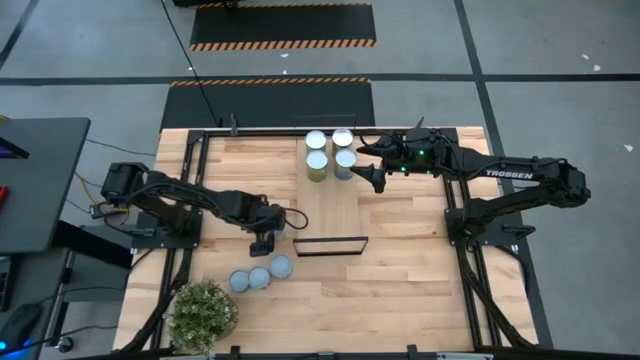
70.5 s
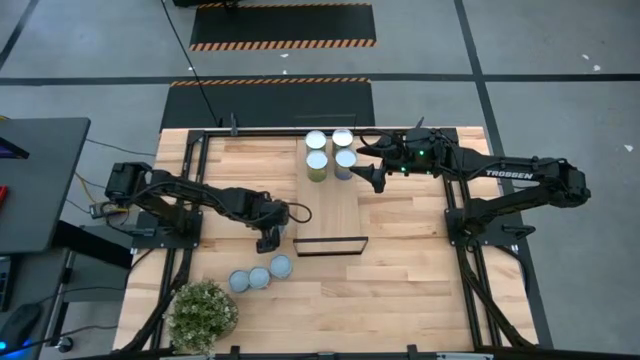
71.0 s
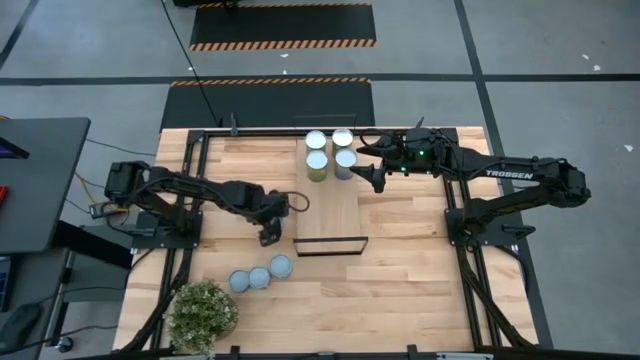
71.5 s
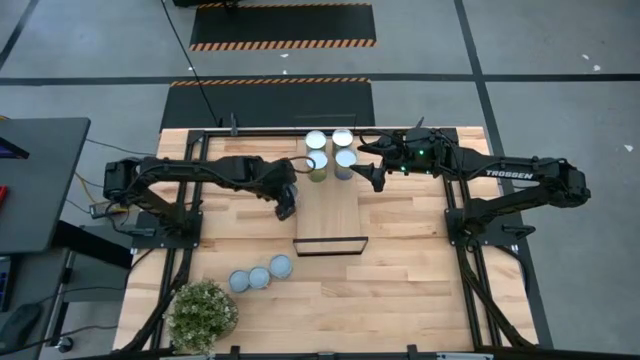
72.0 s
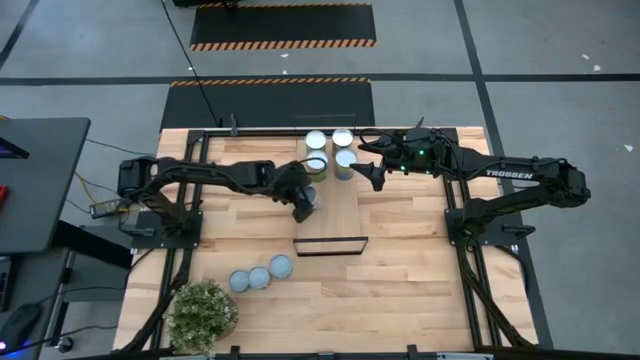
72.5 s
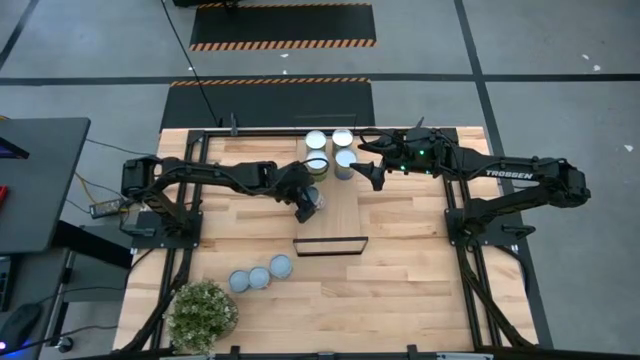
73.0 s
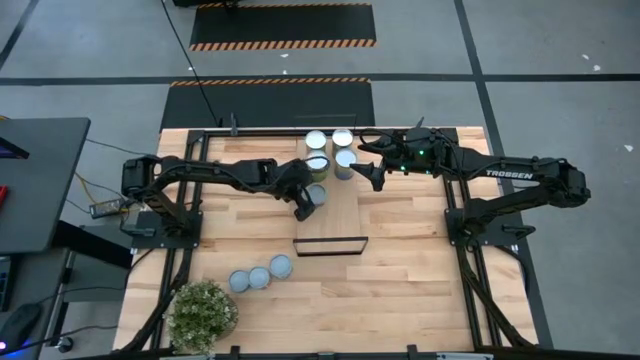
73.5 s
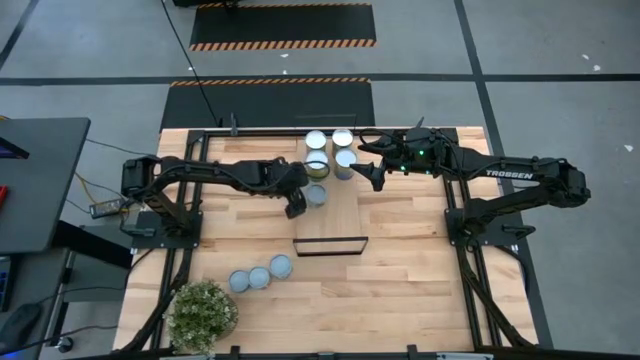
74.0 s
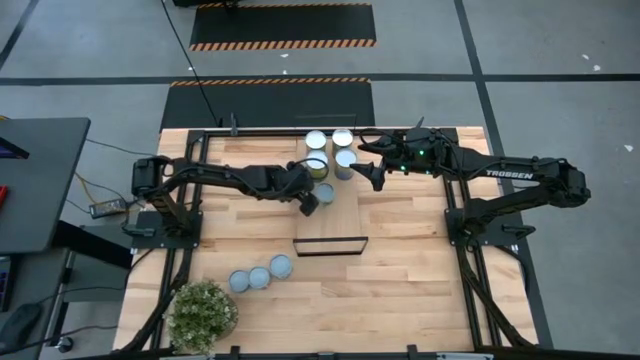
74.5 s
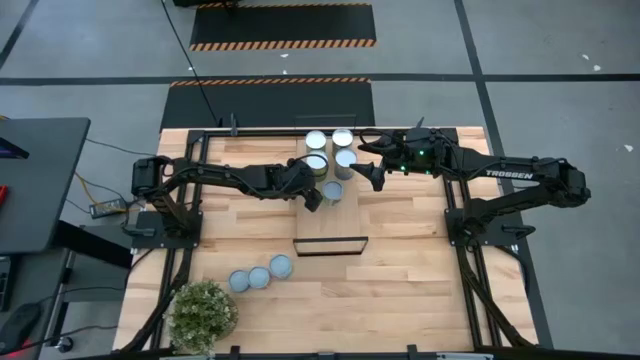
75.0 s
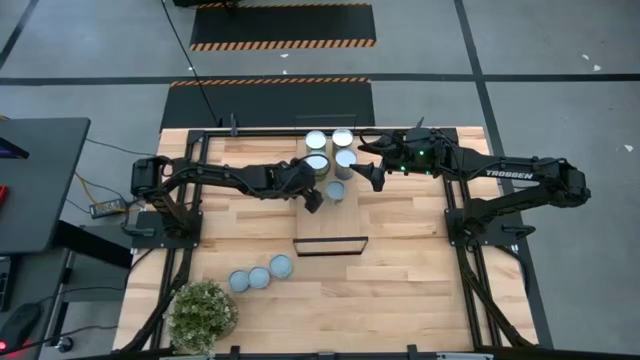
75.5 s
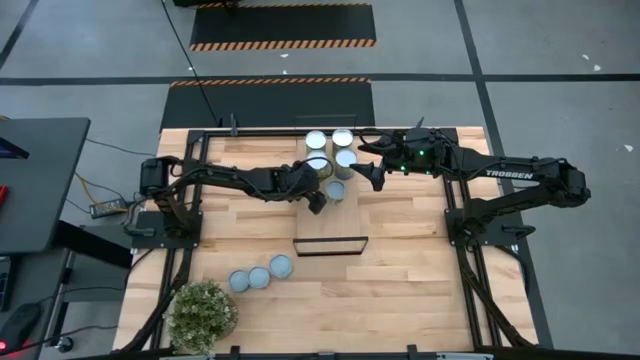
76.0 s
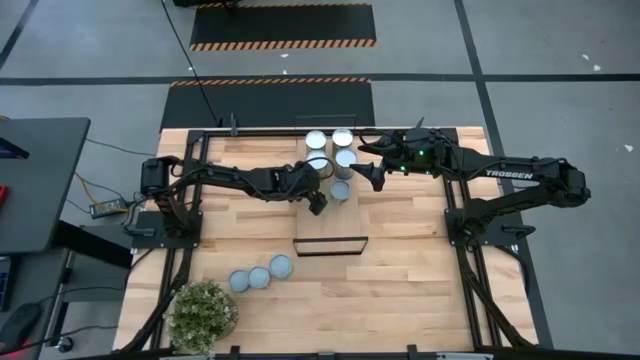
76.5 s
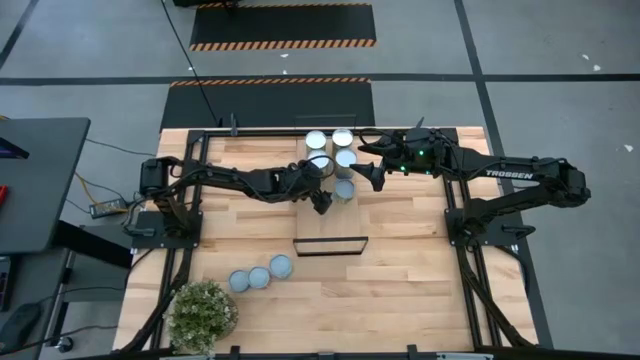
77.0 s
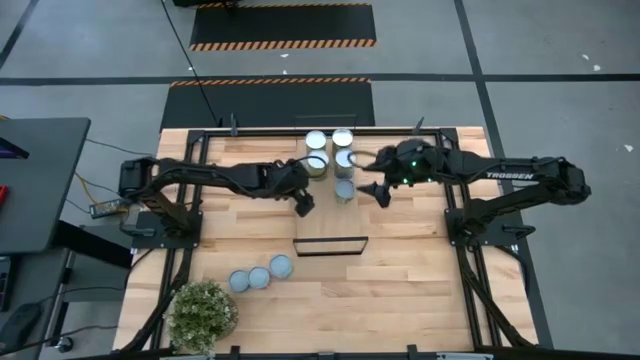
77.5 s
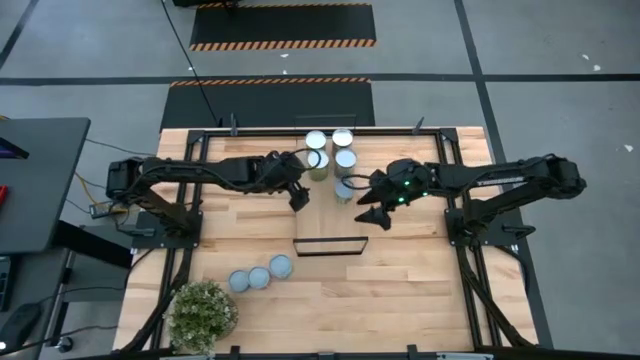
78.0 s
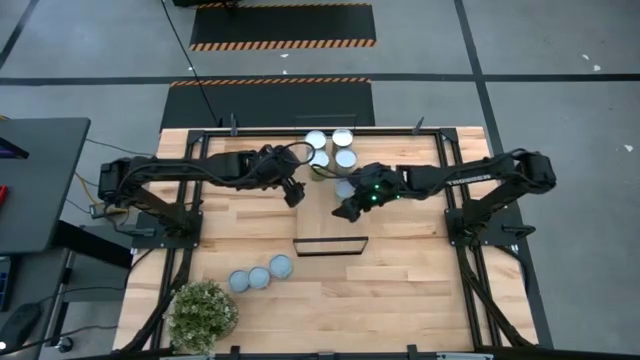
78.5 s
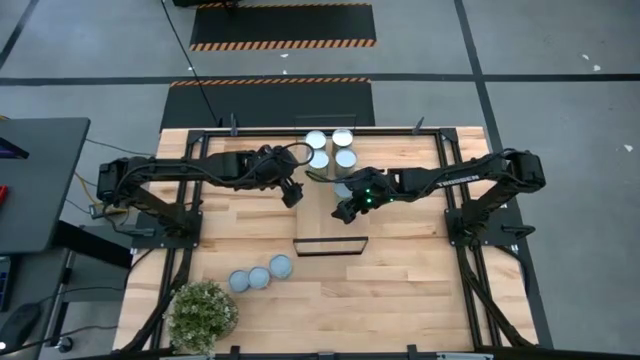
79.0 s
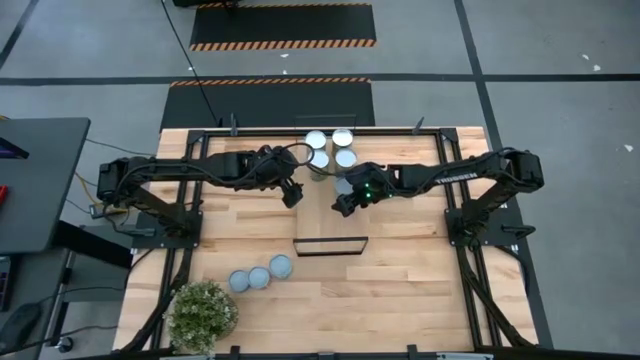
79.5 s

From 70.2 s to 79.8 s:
Task: Pick and place cans onto a shelf
Put the canned green peas on the shelf

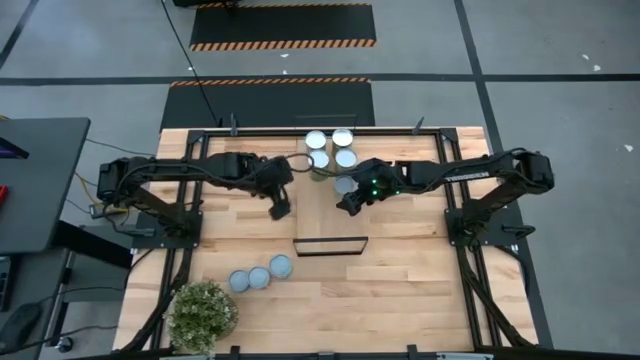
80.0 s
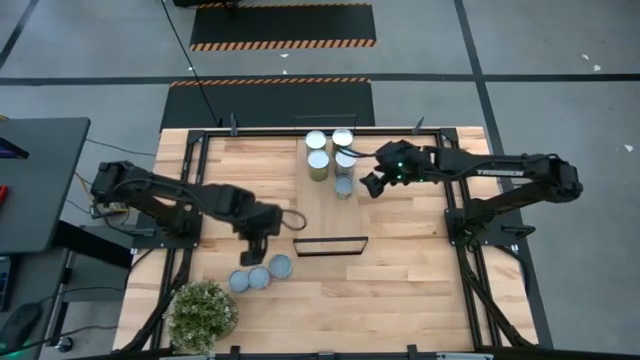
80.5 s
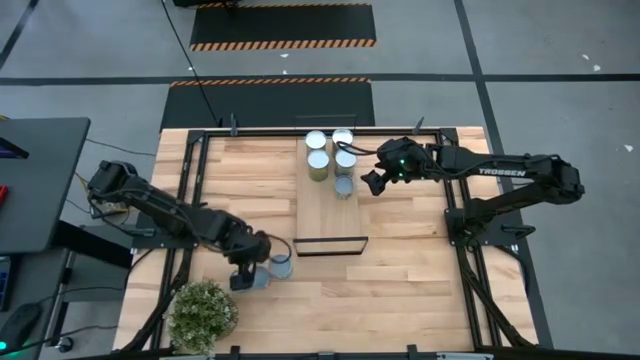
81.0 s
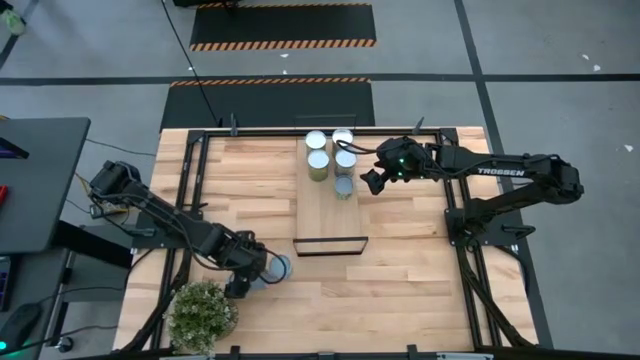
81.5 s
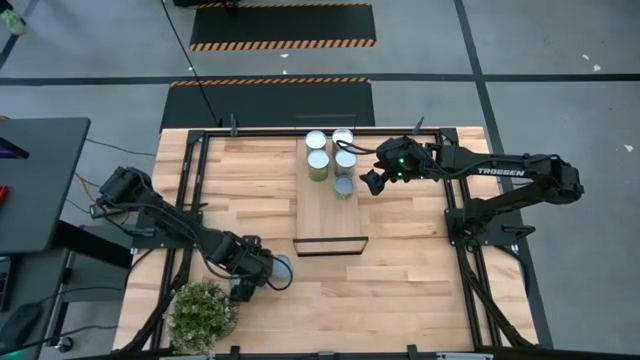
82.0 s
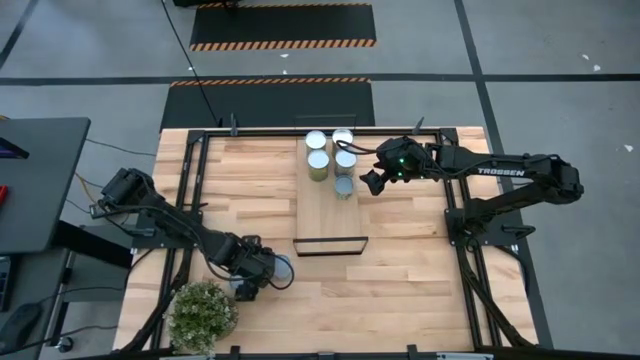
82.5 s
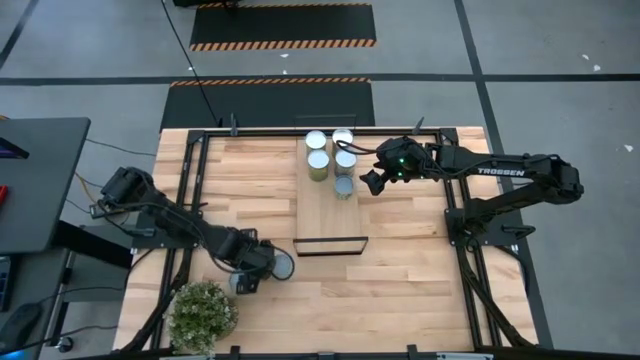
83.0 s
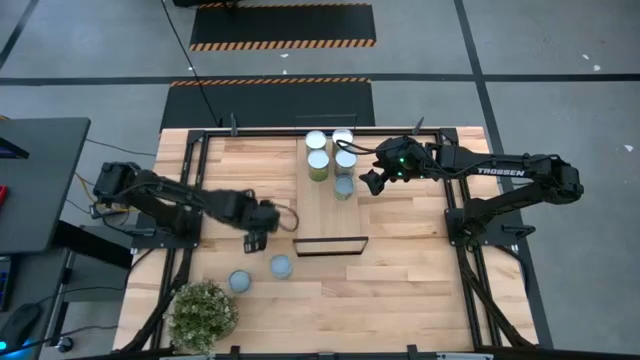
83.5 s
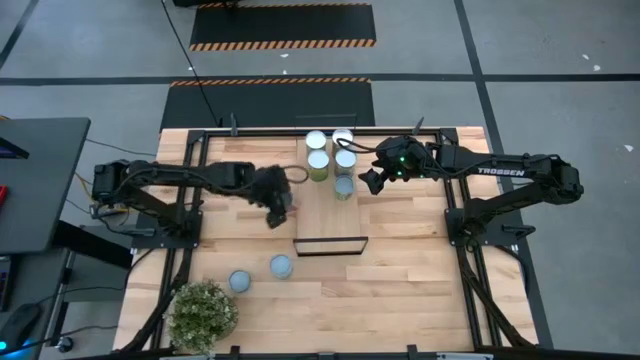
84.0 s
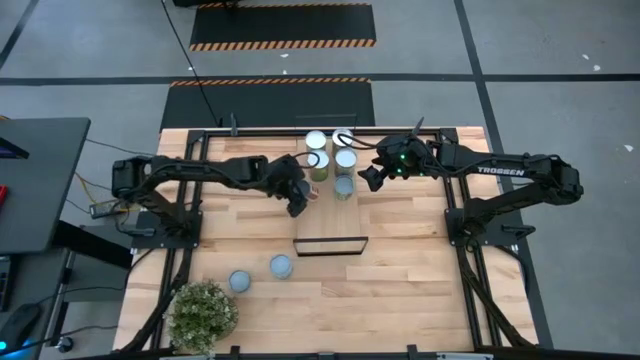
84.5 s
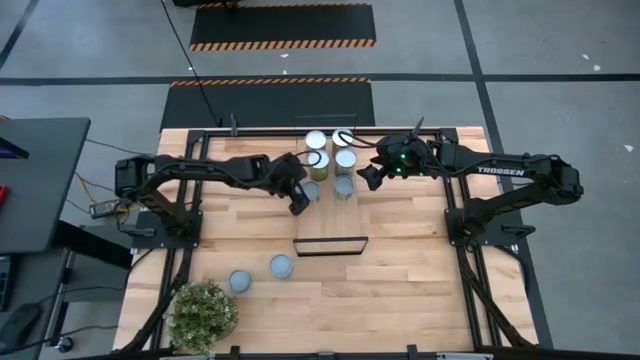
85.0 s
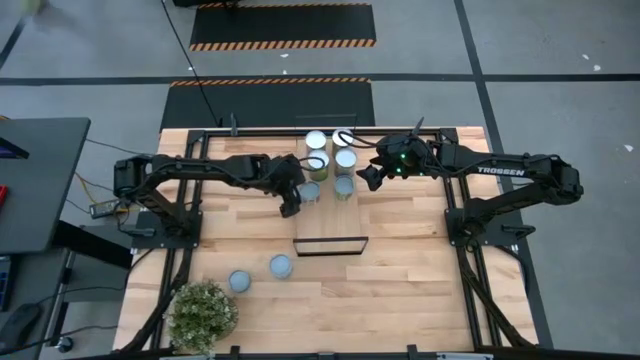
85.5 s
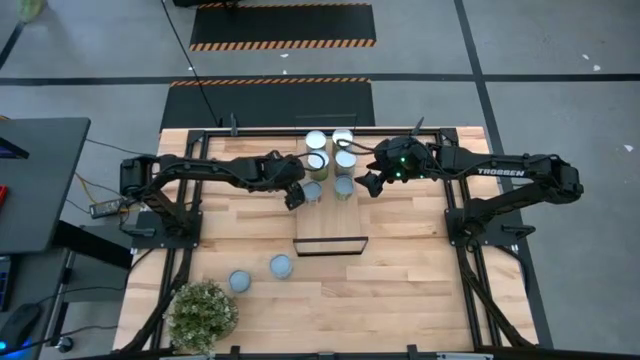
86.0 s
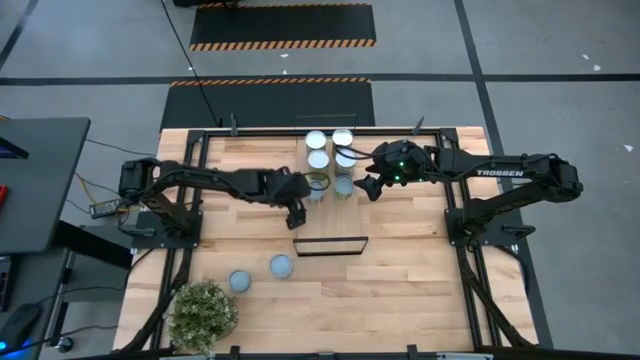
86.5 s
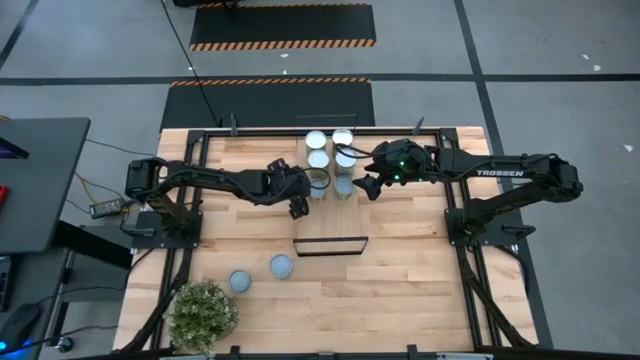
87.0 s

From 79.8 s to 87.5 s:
Put the canned tomatoes on the shelf

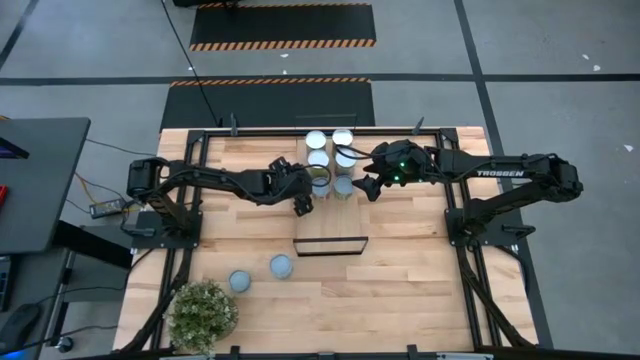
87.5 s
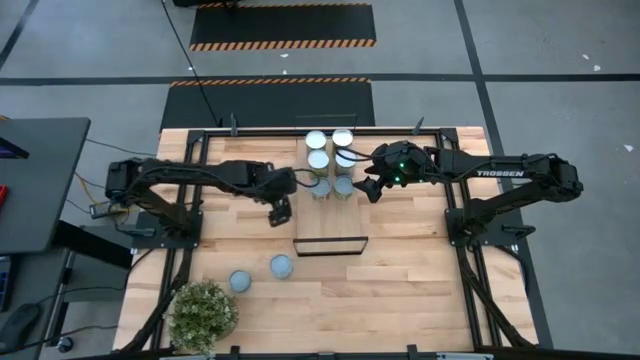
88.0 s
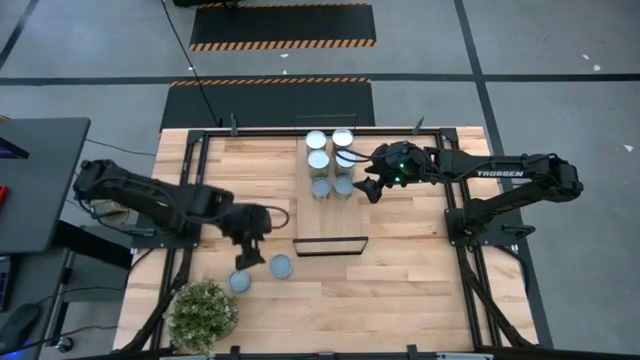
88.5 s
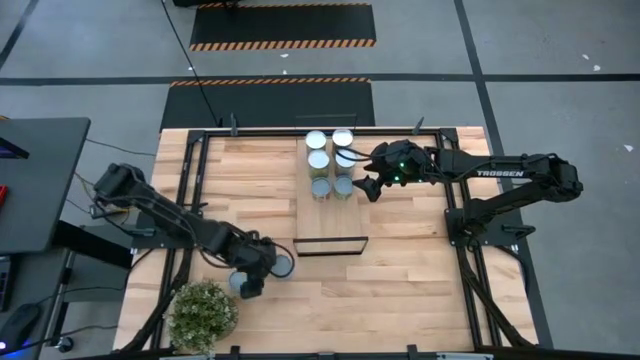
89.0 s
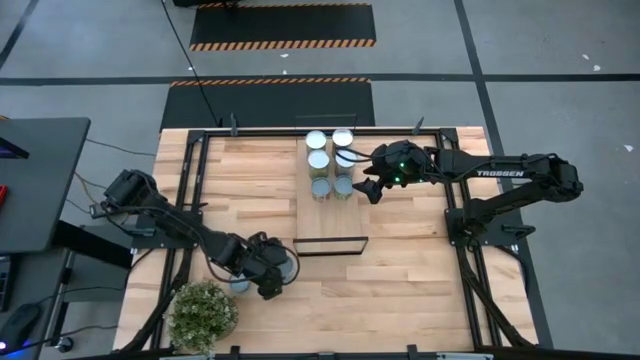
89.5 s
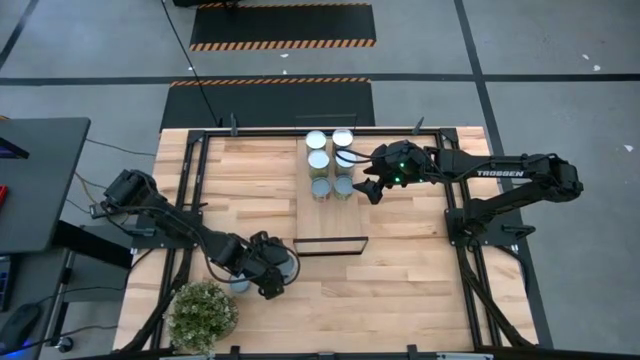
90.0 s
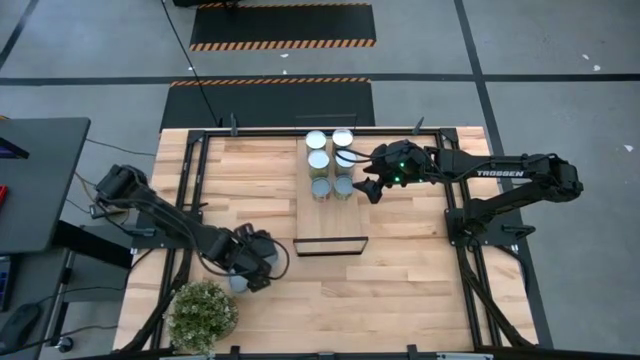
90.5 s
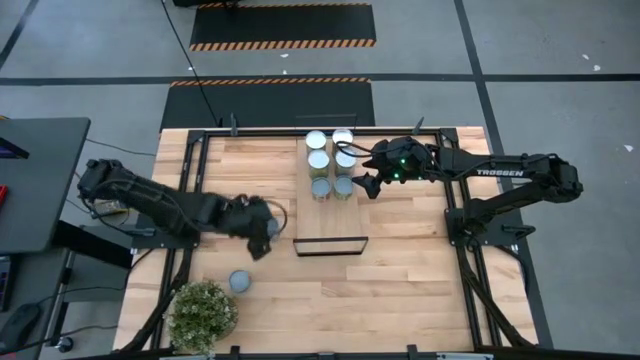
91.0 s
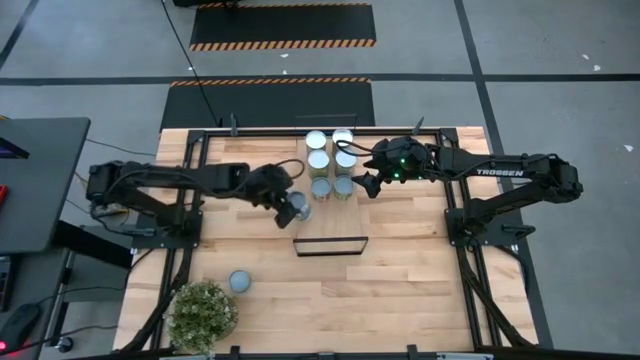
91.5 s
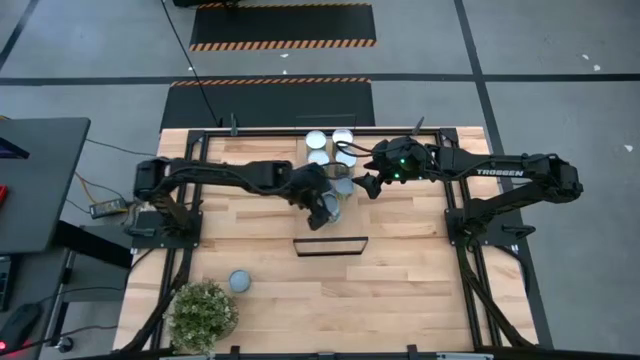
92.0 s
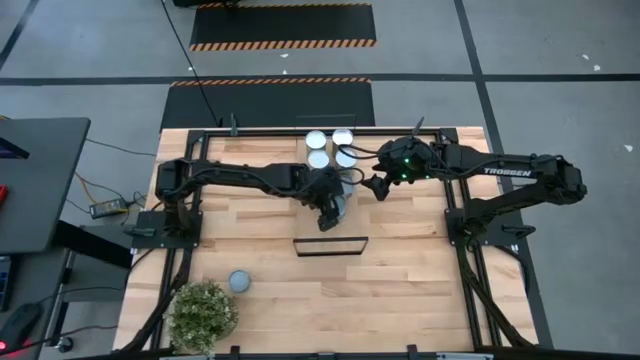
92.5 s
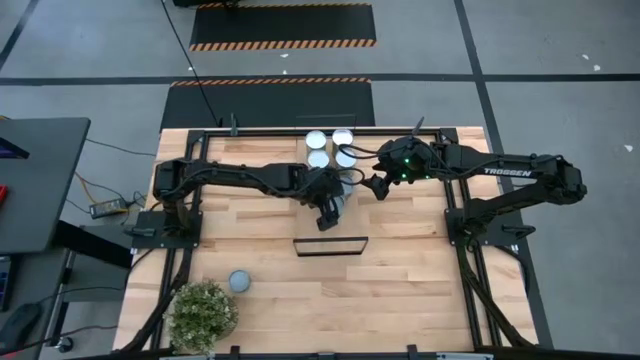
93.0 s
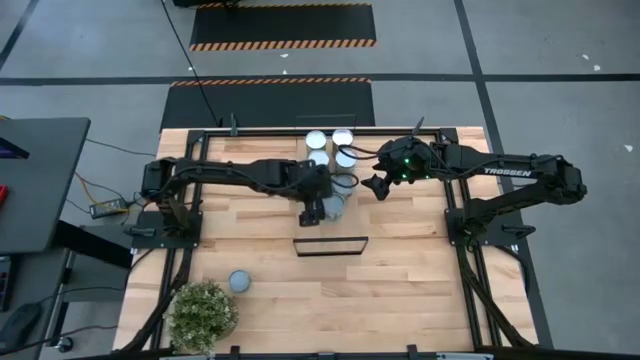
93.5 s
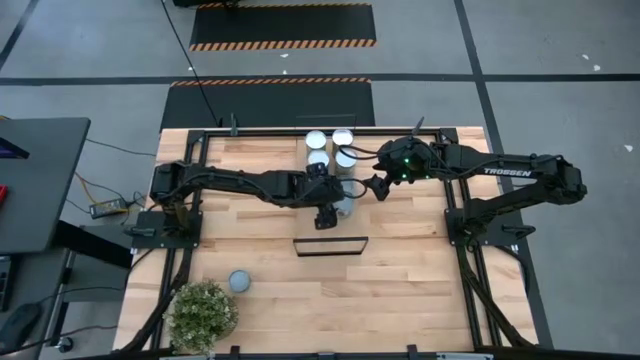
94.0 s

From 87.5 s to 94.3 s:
Put the canned mixed vegetables on the shelf
